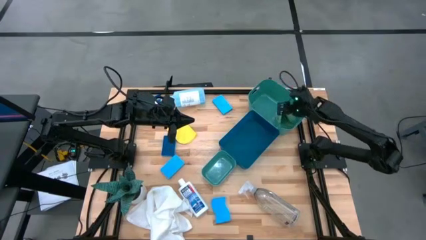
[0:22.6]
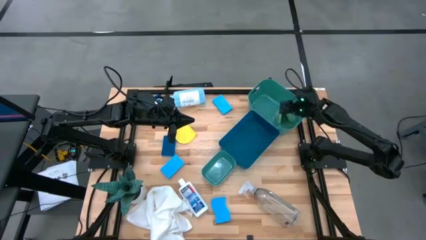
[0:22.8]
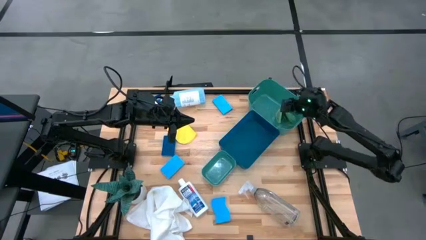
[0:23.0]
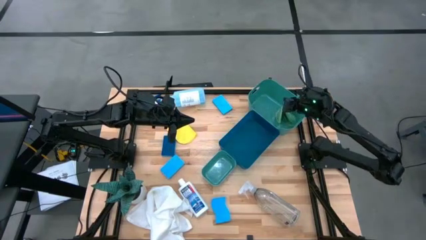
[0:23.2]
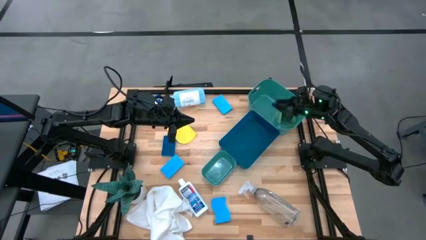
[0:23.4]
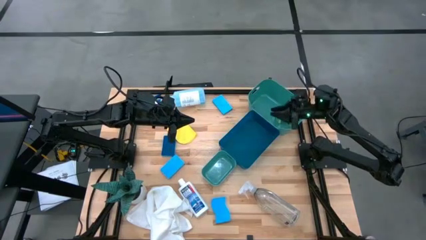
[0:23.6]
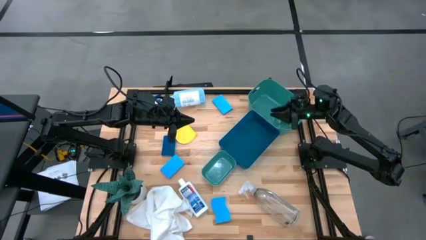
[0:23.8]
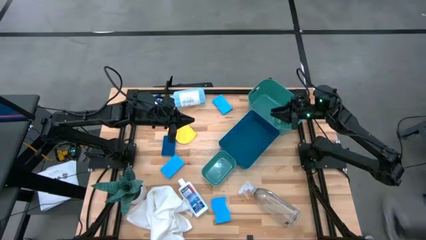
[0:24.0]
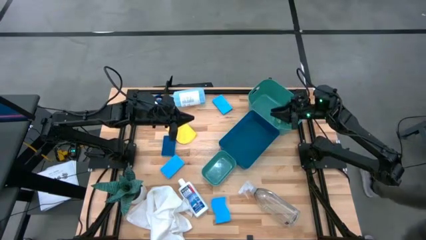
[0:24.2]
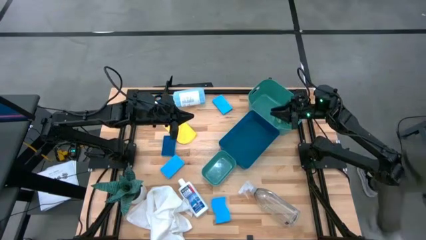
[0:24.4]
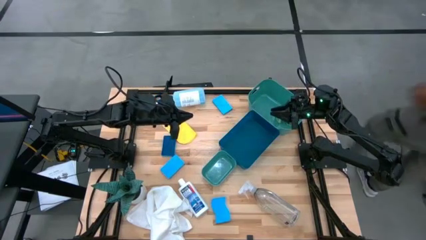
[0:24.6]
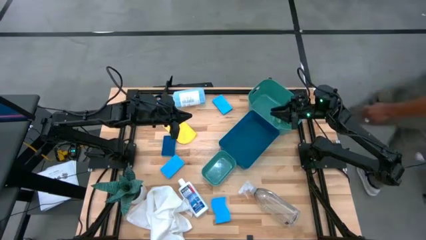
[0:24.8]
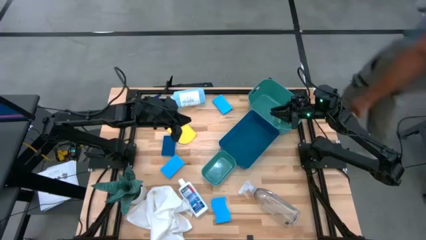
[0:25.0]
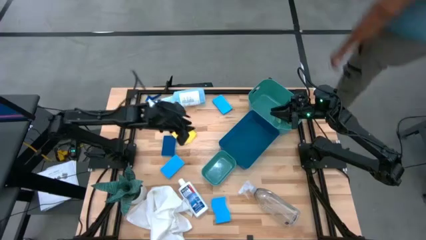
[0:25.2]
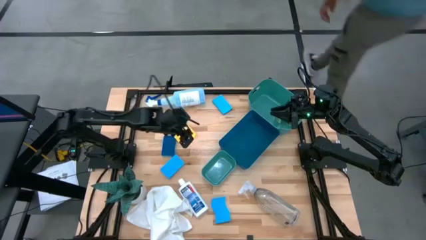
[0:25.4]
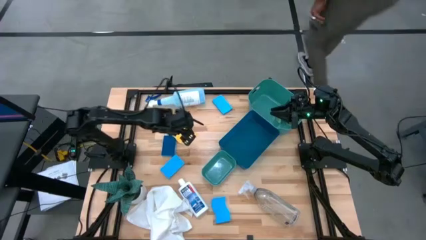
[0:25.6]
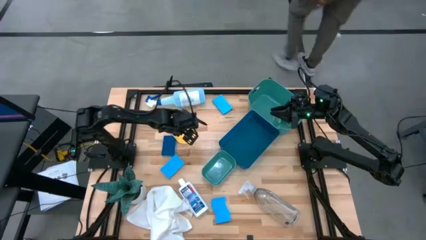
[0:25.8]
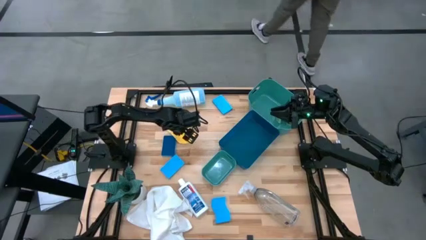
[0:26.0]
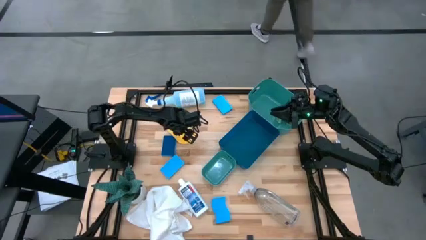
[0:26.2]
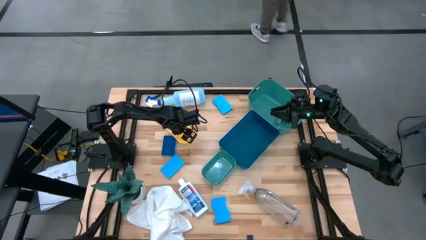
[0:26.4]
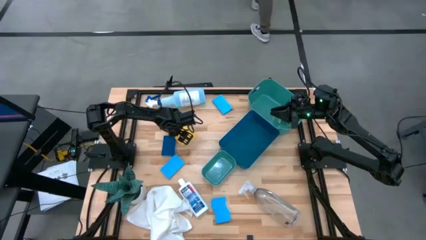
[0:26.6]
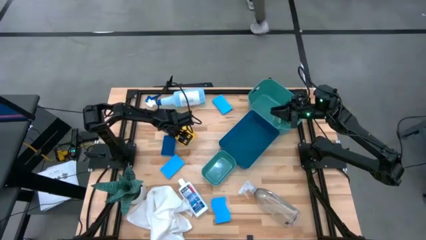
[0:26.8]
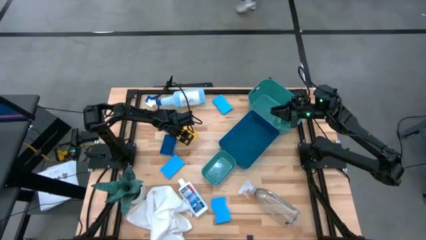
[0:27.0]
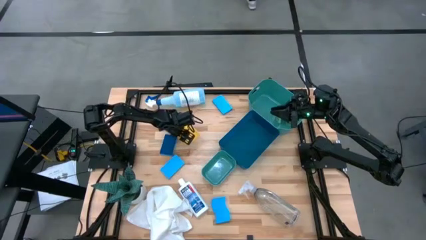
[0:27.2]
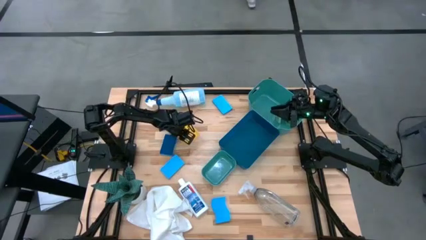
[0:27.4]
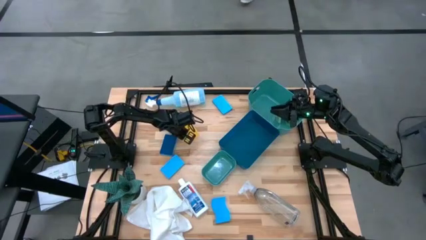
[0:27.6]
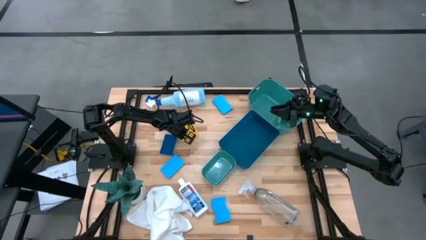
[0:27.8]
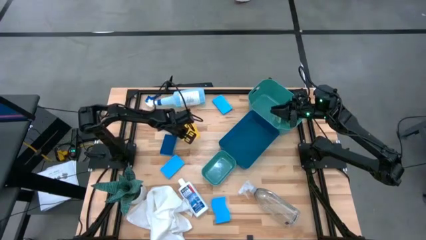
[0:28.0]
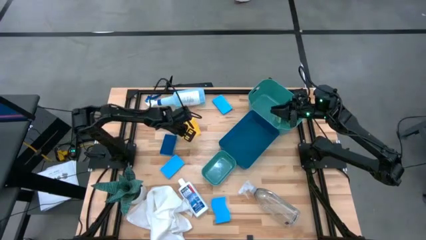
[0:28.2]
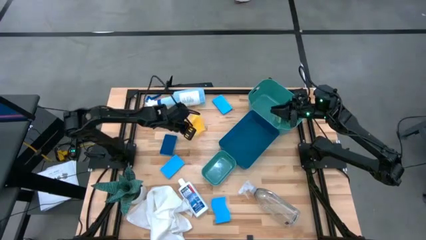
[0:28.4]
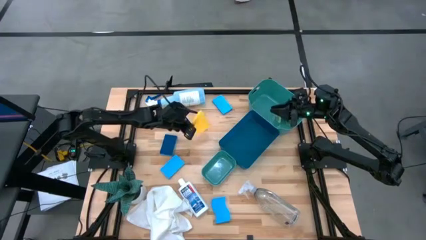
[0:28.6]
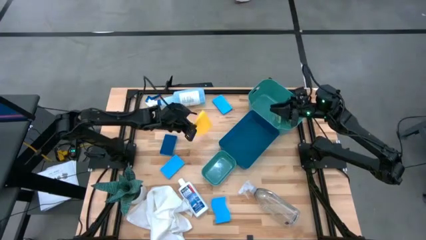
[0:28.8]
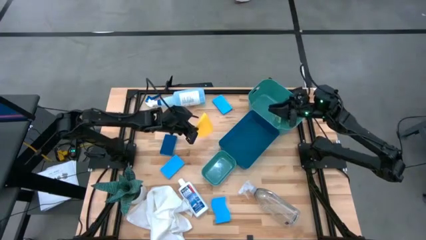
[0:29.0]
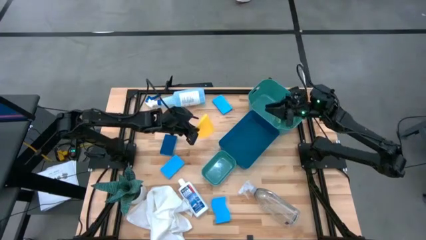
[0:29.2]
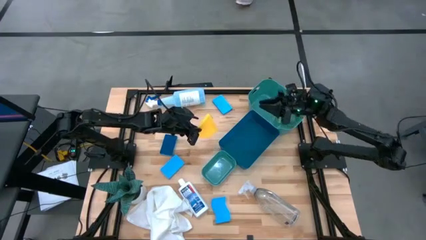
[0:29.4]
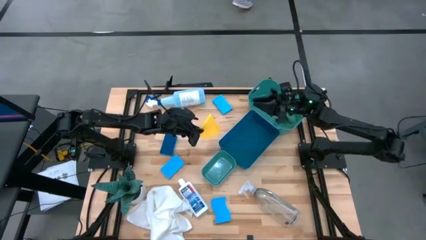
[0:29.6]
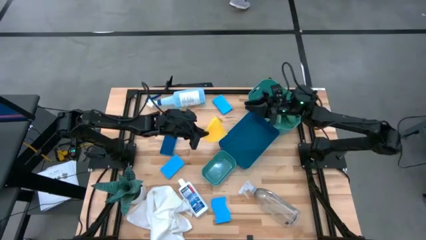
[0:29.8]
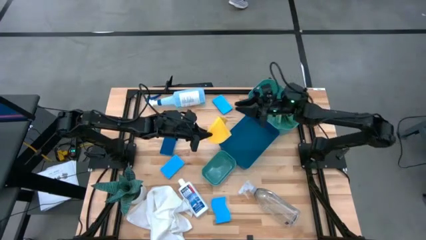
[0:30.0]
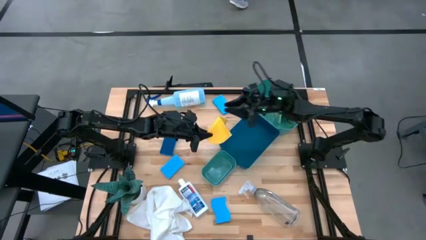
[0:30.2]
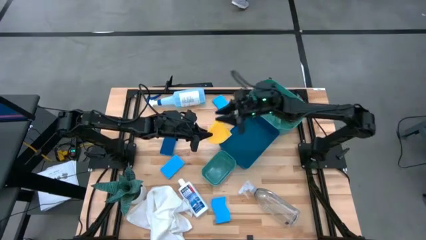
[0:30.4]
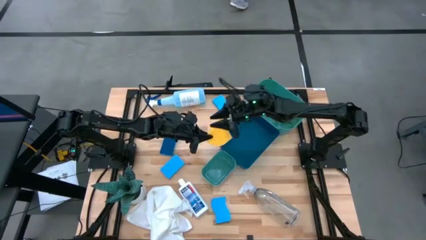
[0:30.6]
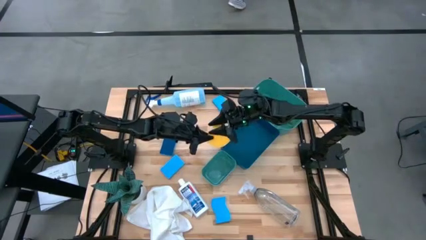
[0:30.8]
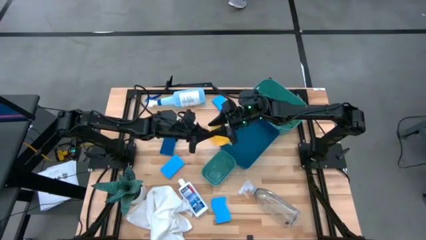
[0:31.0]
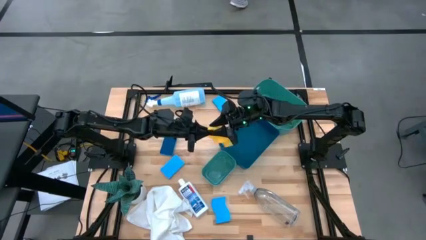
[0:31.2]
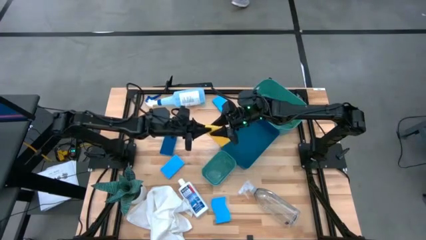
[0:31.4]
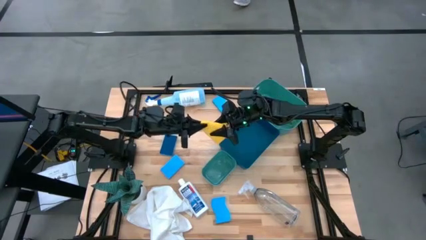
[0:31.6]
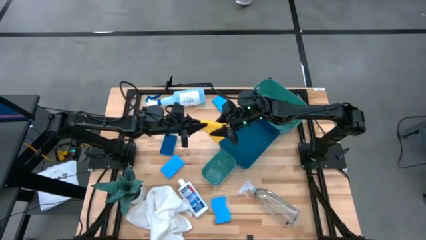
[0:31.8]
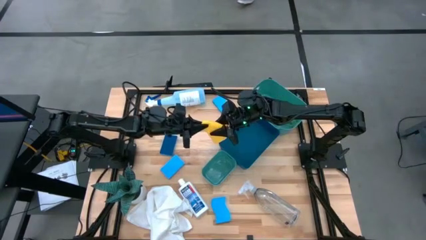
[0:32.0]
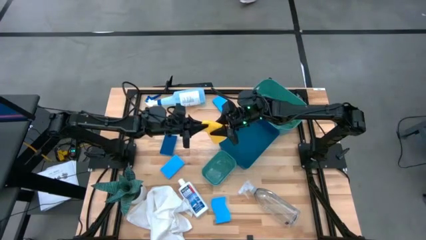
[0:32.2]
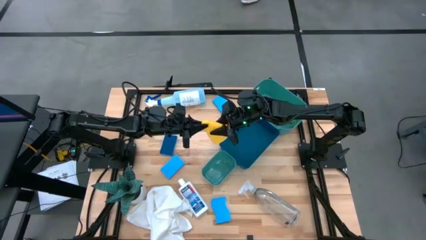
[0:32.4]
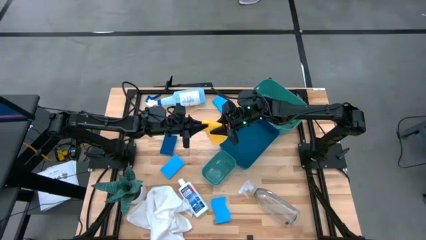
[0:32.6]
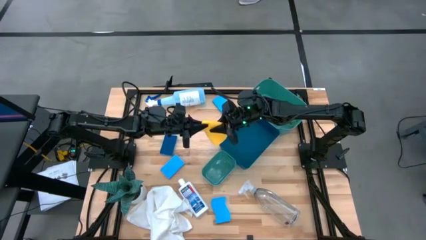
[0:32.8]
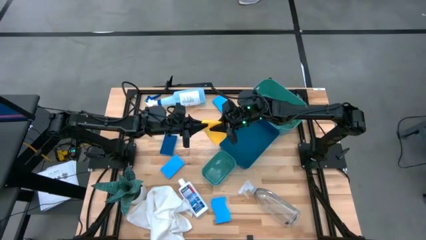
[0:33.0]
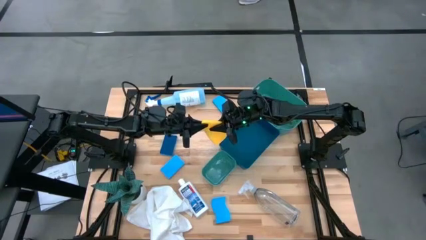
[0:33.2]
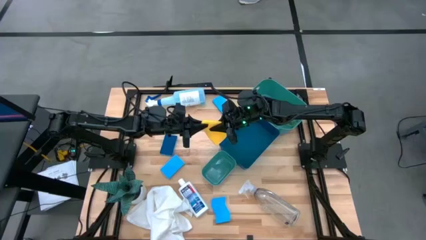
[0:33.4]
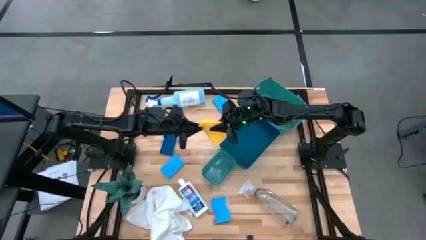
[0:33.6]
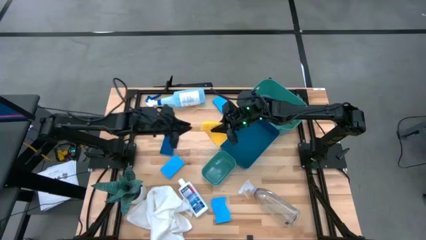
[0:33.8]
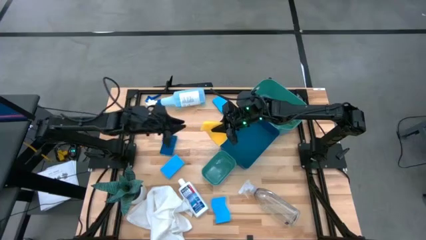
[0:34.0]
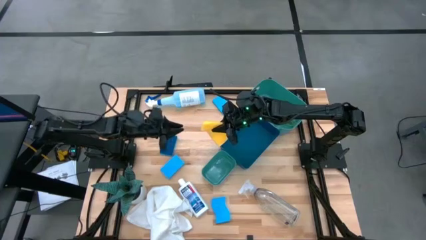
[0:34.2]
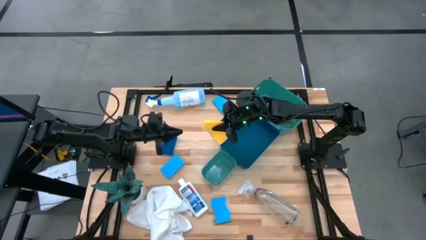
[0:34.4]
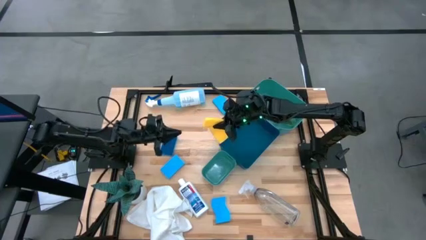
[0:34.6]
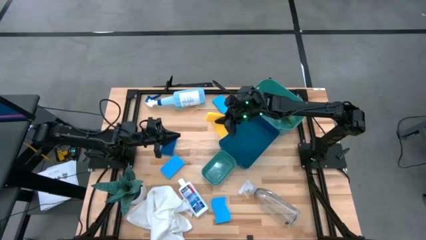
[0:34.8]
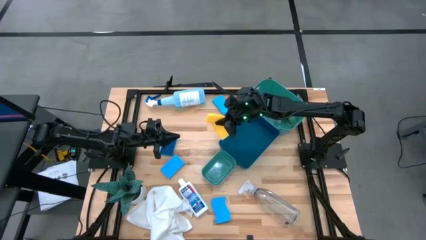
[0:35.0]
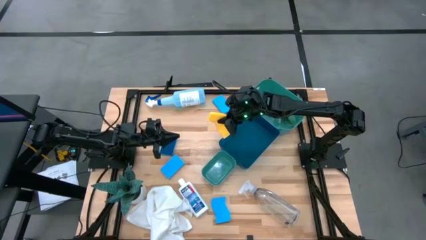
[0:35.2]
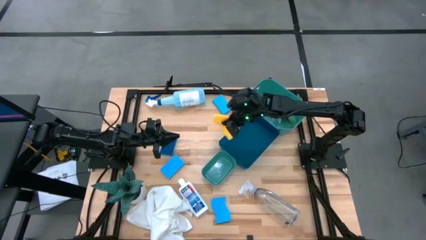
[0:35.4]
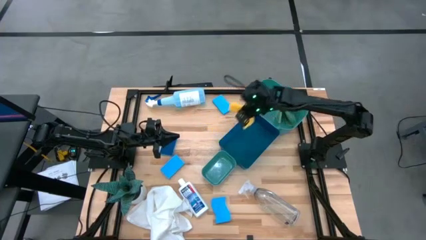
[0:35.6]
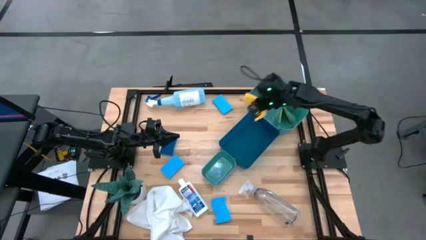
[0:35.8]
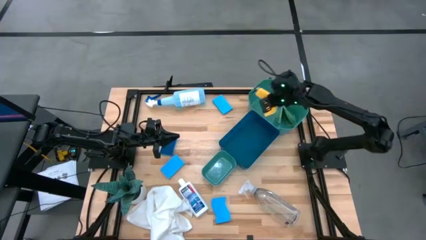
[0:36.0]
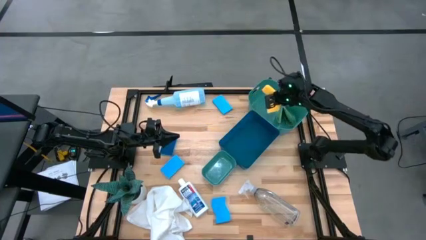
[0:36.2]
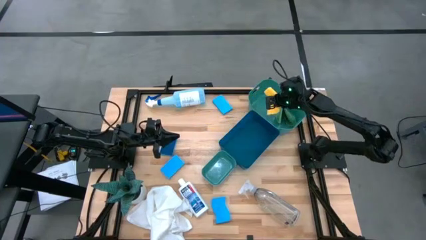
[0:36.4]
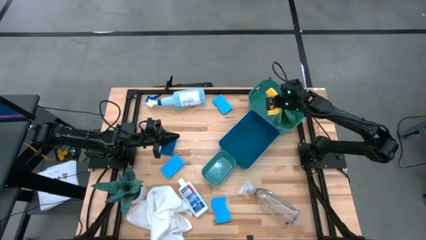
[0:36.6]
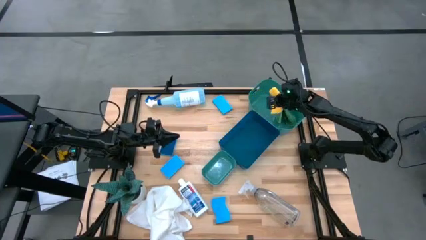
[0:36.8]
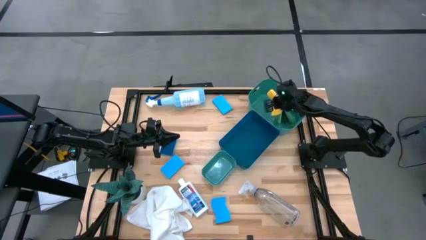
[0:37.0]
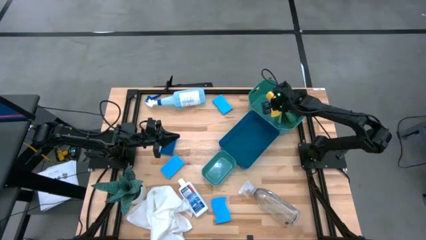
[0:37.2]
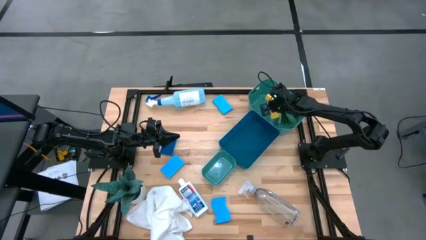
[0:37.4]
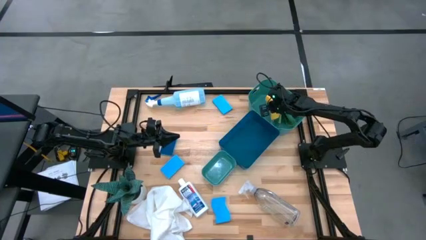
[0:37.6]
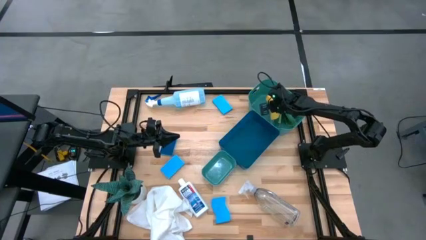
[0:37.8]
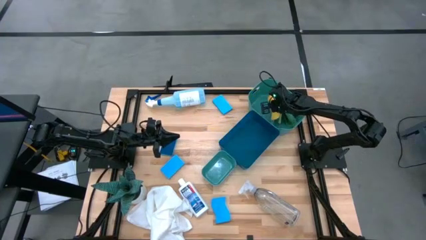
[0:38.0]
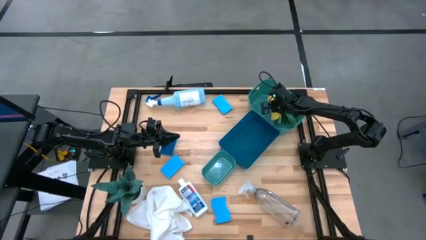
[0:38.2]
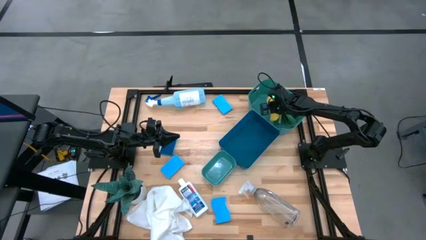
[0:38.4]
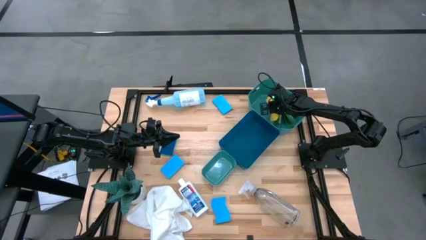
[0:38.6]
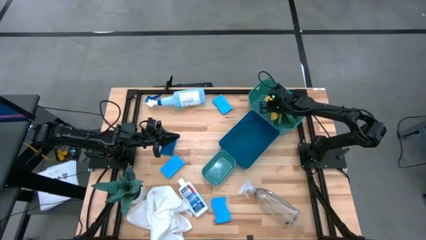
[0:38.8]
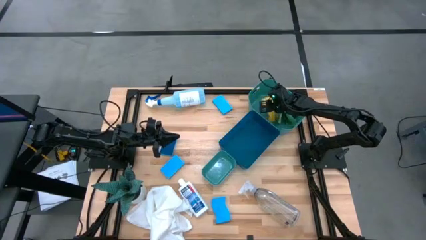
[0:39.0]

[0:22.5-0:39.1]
Task: Pick & Place Kitchen Items
Put the yellow microfiber cloth into the top green bin
